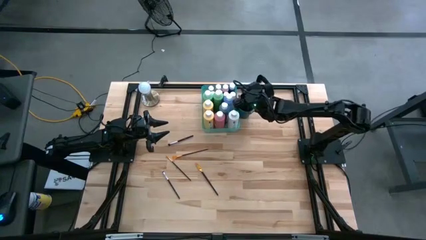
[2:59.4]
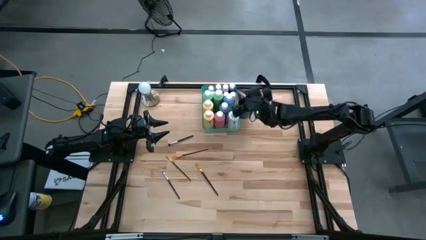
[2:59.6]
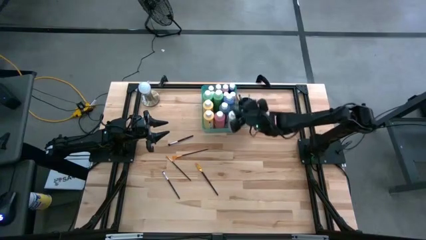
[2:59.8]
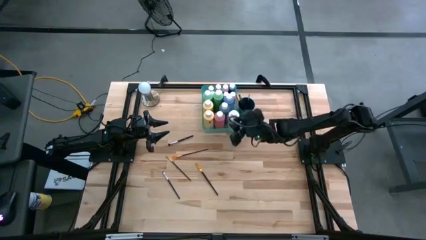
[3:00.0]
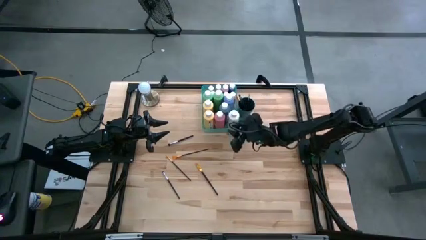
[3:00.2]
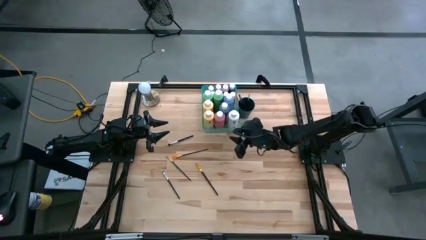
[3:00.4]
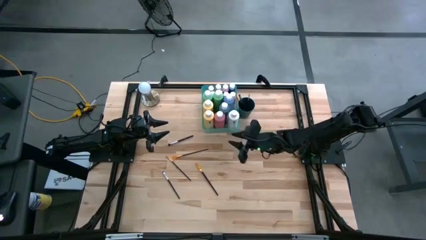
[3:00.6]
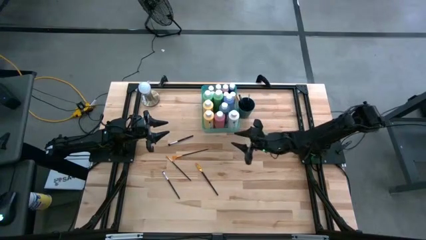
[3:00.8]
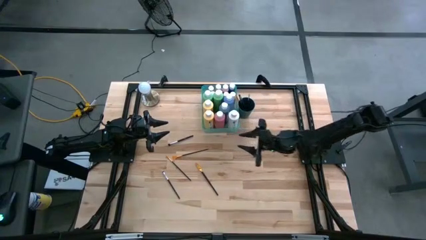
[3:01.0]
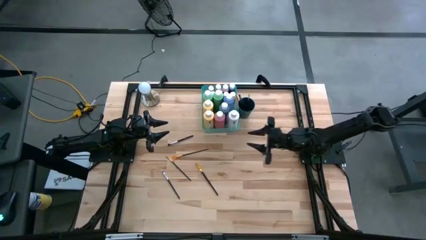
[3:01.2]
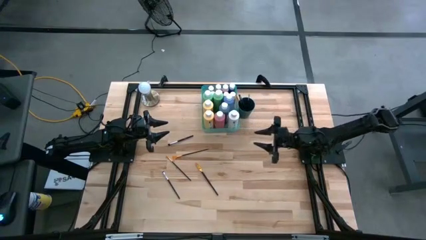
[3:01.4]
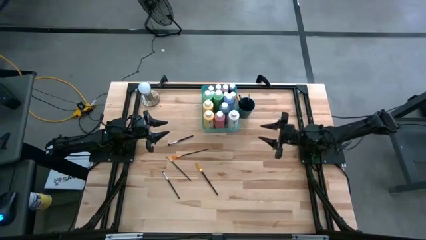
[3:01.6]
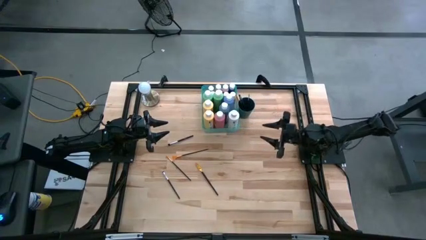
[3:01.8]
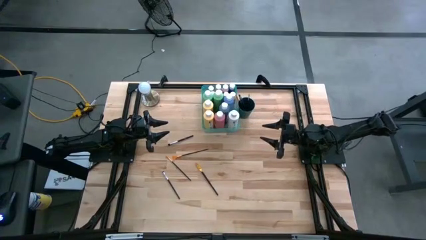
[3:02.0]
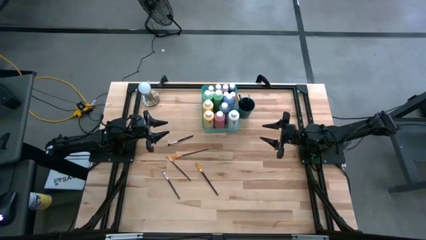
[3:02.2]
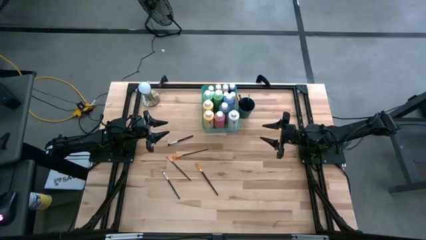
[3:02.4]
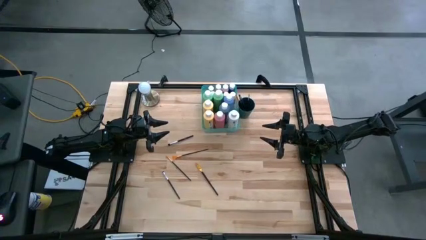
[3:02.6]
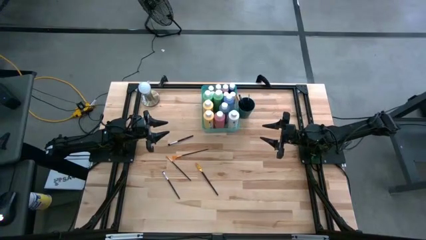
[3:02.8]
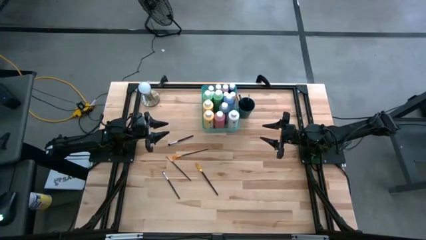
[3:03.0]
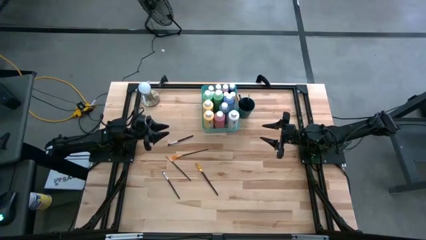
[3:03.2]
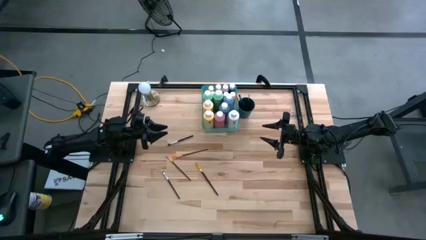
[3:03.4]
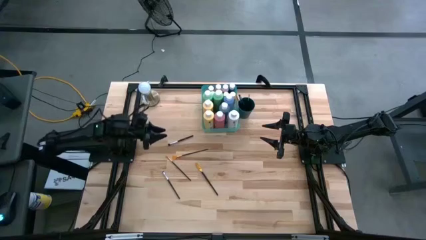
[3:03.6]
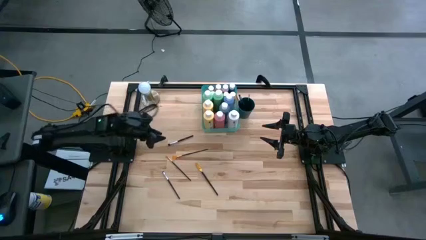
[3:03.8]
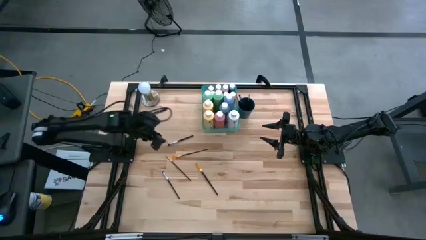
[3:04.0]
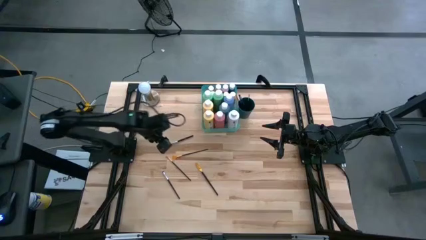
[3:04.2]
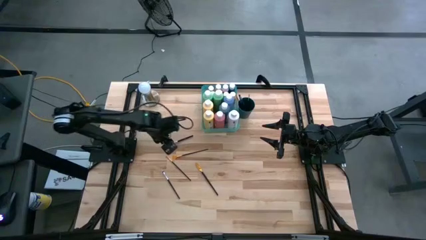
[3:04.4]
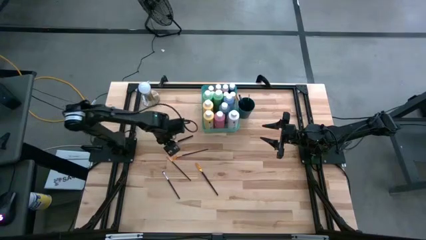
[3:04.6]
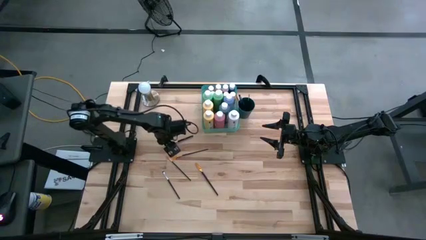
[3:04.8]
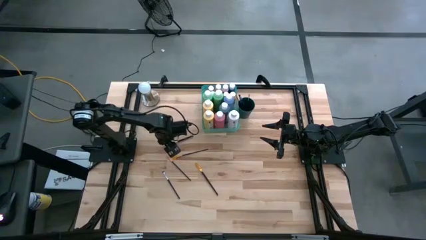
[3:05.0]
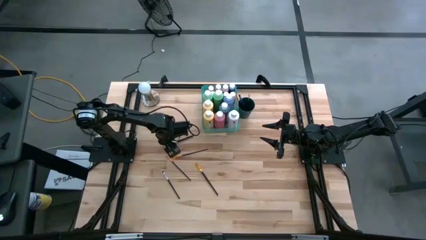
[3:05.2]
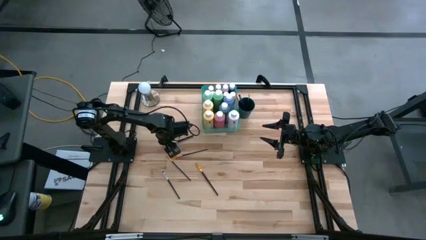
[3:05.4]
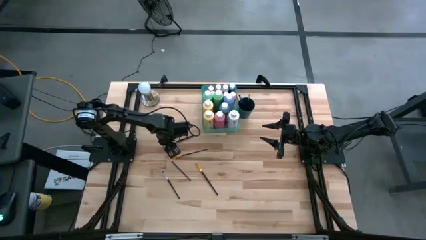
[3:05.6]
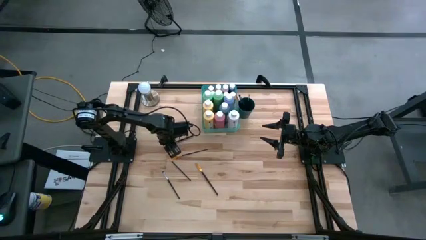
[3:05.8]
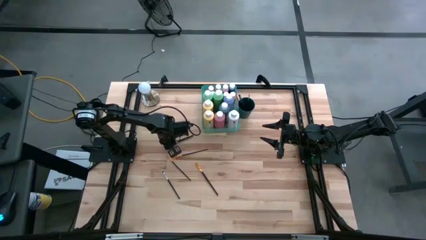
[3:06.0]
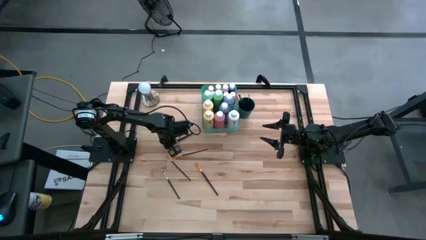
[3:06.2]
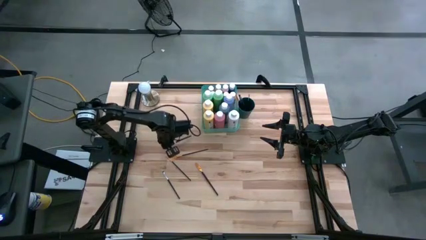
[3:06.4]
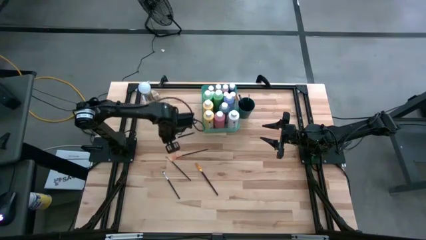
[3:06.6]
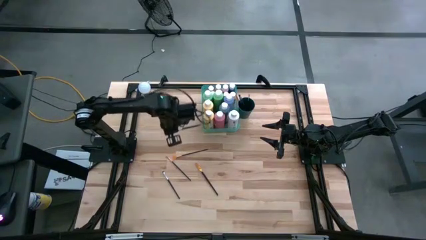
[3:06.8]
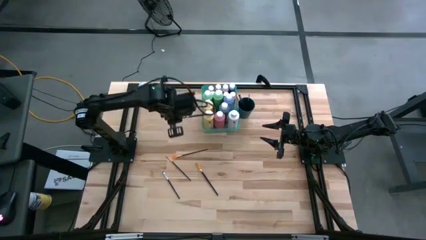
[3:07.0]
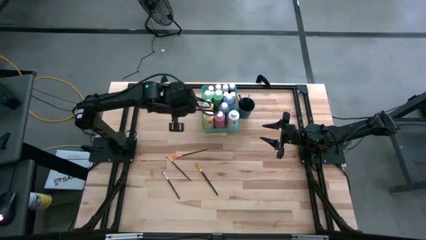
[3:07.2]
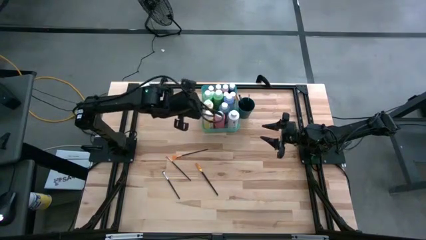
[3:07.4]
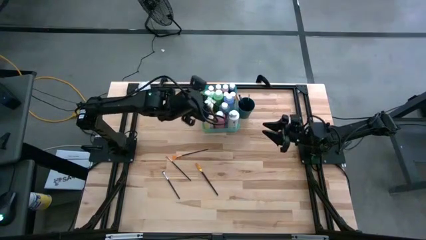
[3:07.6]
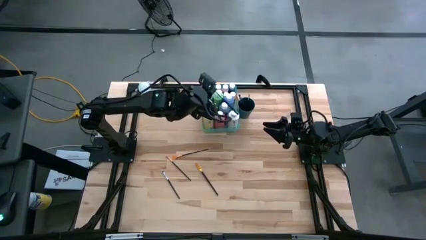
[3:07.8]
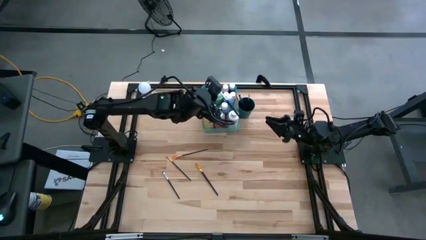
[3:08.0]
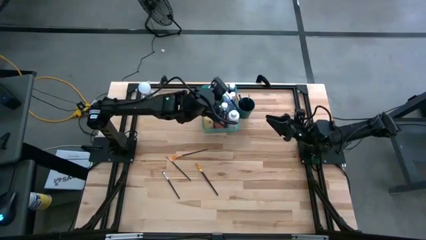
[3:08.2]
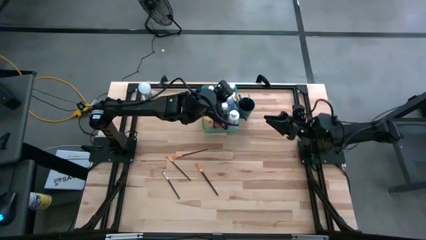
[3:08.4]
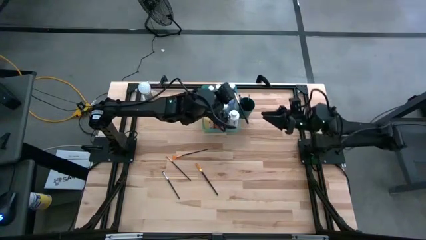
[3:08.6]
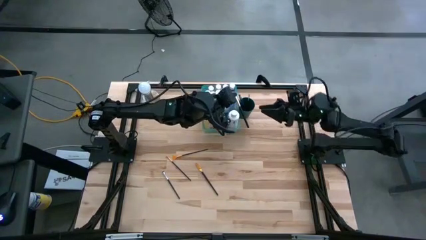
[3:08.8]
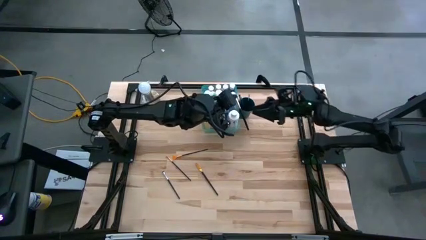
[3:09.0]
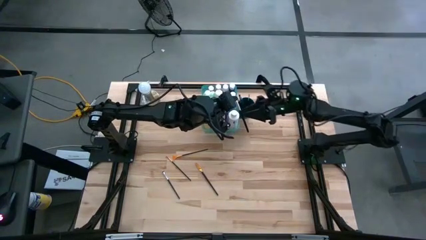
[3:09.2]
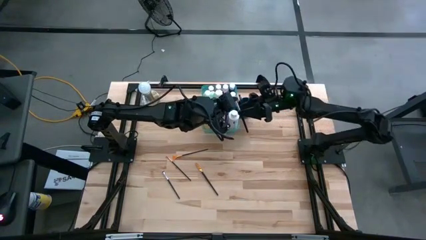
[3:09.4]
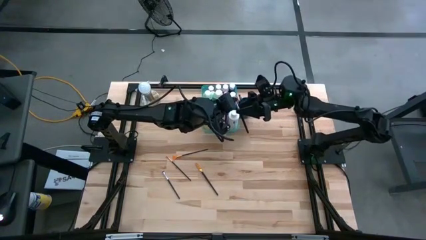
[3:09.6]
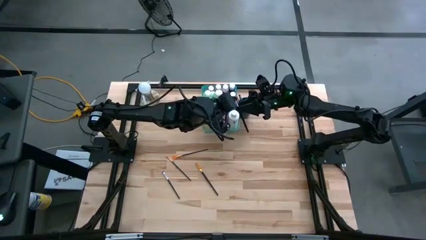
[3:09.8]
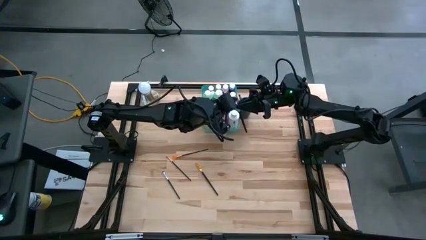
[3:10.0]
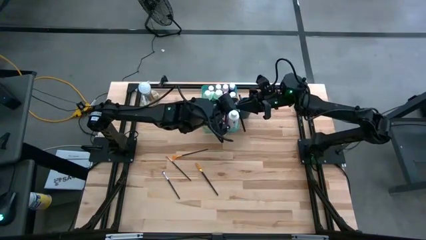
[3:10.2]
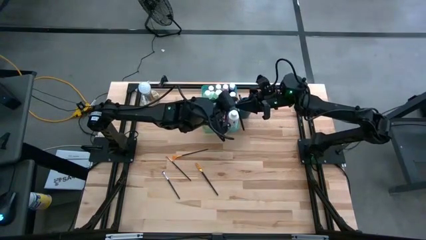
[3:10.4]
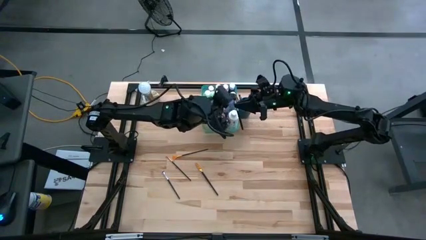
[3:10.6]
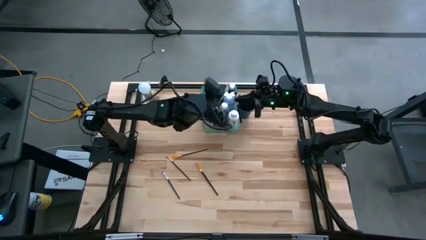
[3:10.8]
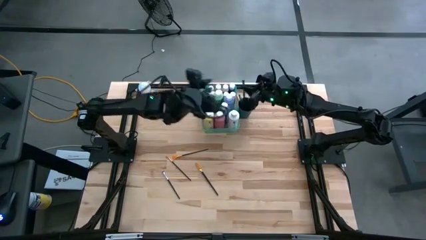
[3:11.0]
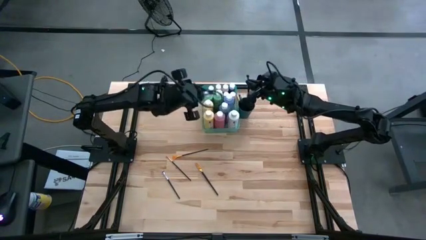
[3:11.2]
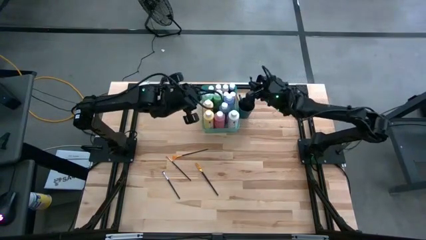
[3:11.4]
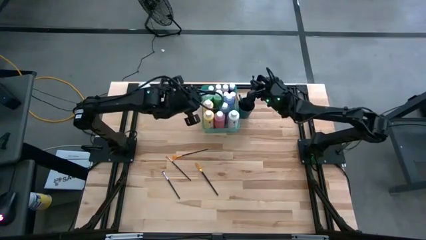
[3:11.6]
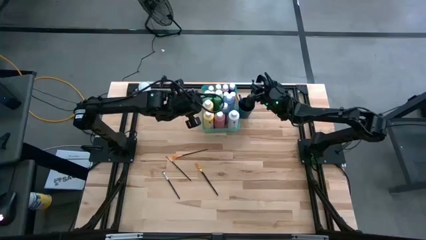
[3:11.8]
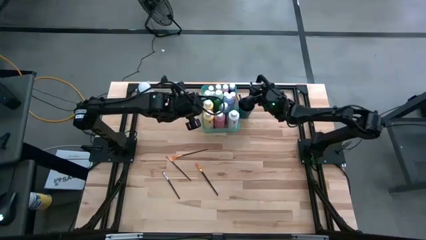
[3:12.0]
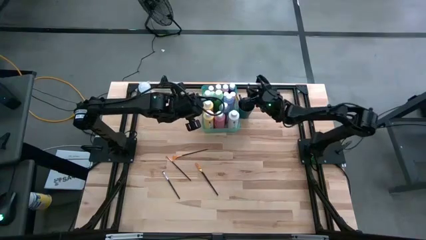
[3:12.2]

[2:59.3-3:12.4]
Task: Pick & Place Paint Supplies
Put the silver paint brush into the green cup

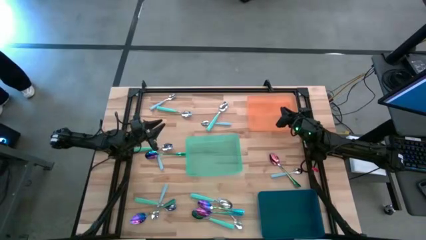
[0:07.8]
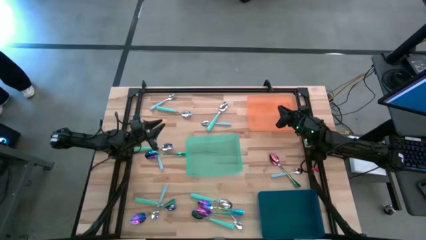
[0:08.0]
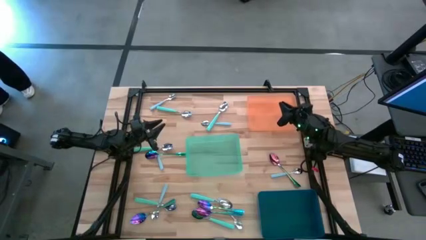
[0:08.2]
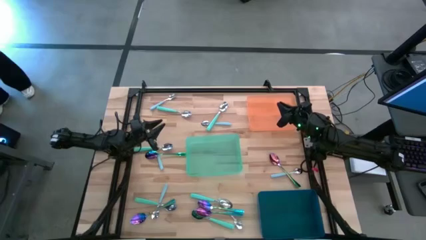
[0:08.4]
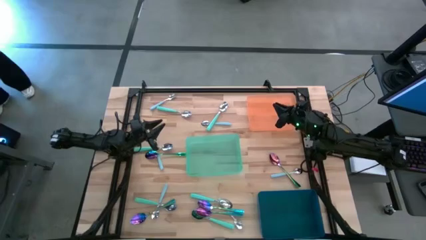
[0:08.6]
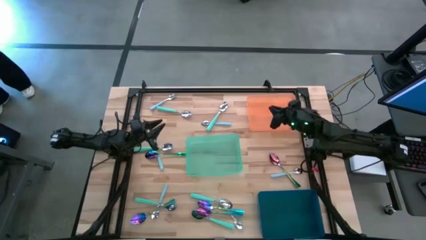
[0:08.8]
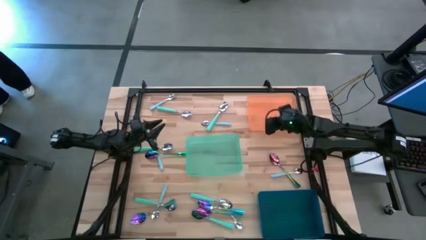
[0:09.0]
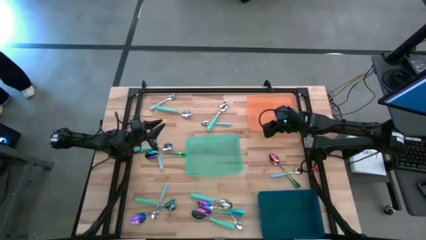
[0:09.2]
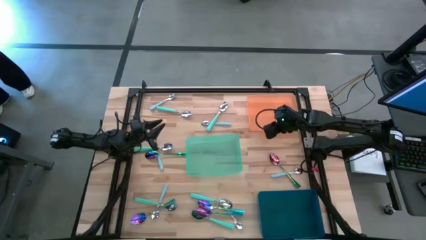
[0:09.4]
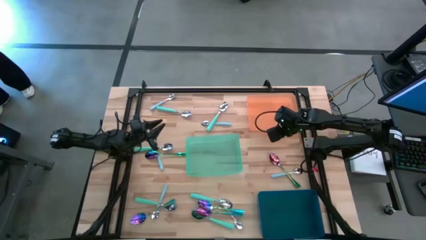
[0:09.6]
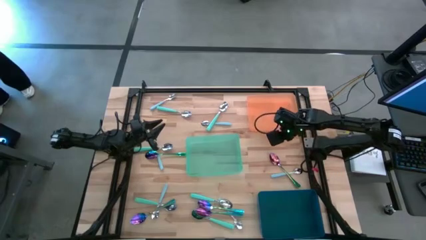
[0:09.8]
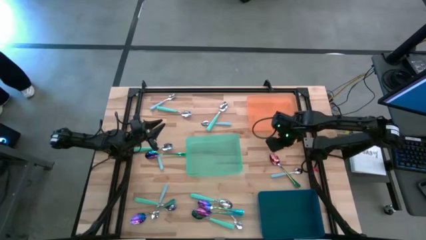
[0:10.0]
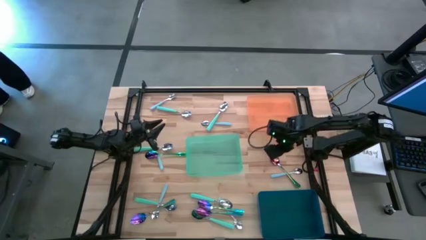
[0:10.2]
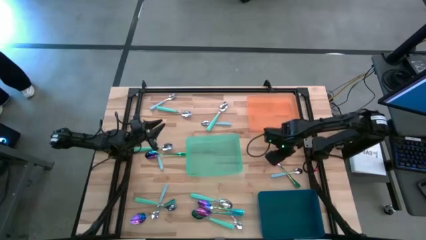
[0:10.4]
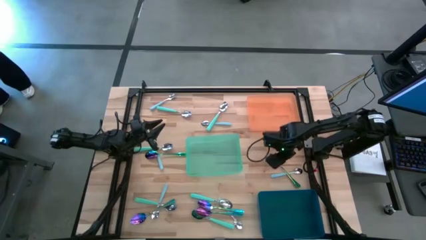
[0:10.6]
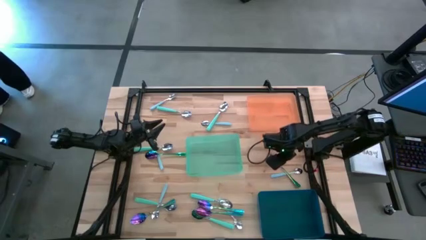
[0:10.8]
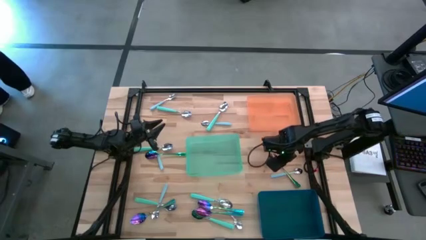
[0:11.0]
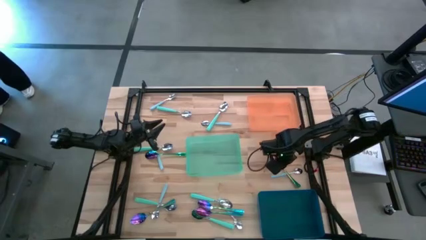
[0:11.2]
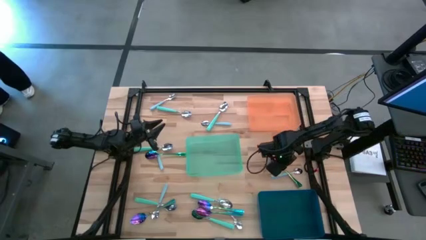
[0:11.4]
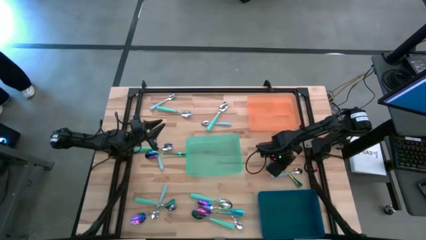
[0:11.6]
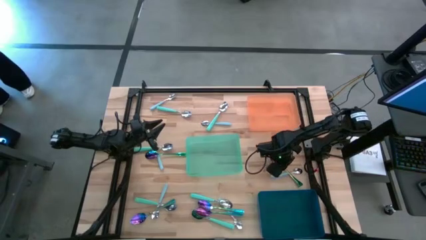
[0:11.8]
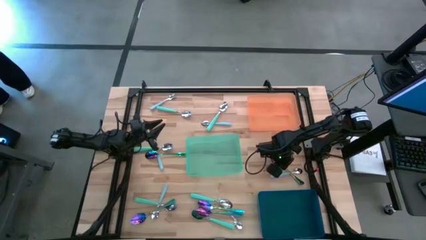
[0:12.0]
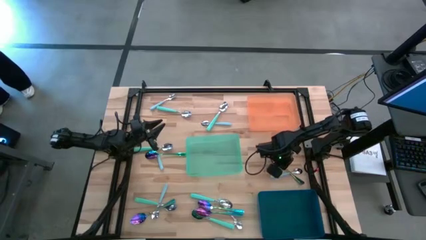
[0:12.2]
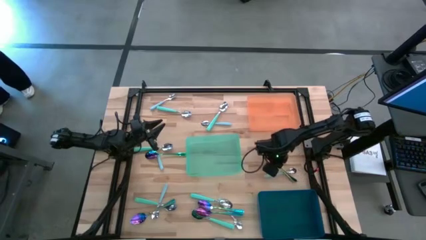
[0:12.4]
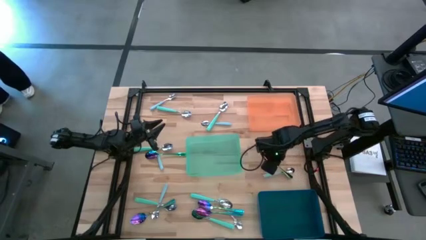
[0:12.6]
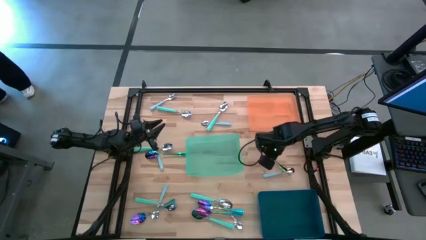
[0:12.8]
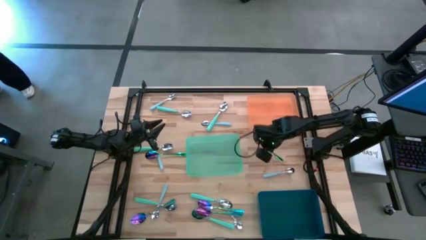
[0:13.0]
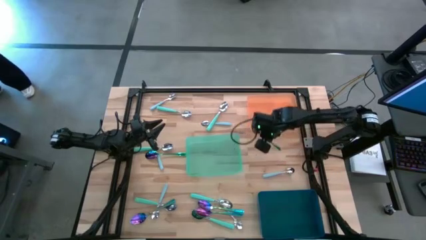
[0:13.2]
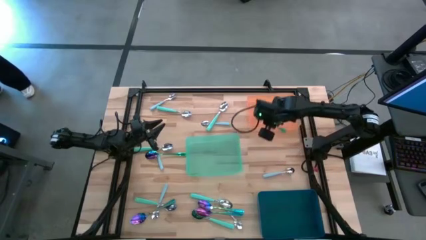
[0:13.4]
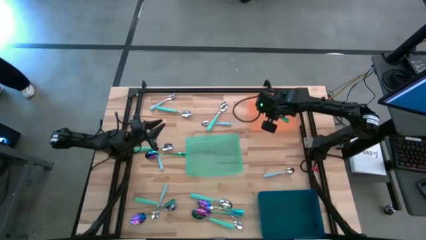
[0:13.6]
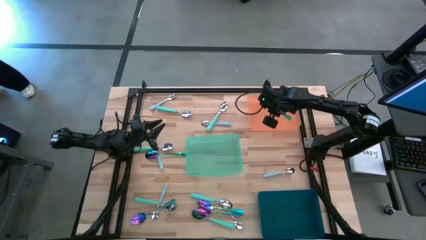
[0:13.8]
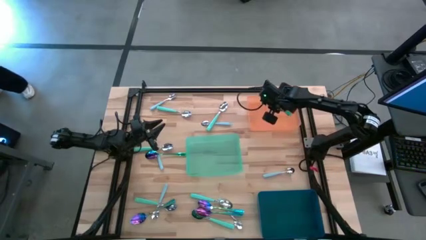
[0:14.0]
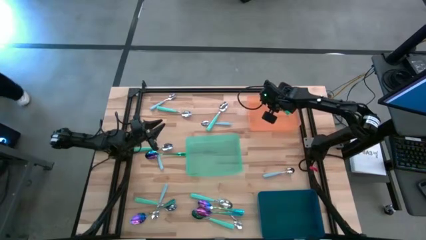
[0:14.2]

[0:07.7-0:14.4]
Task: Sort silverware by color (type)
Put the violet spoon into the orange bin
